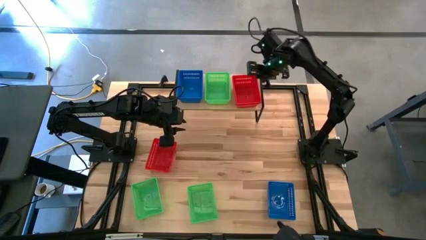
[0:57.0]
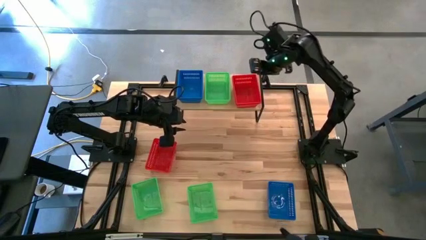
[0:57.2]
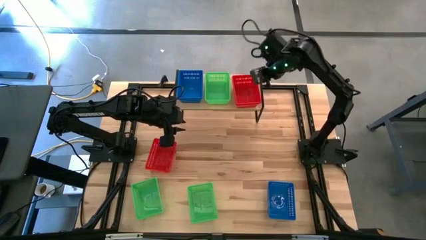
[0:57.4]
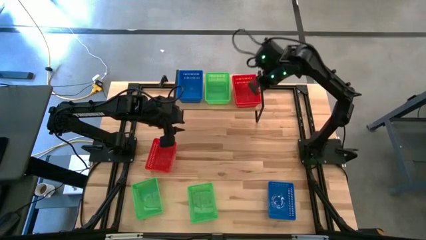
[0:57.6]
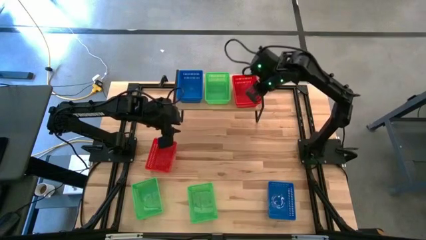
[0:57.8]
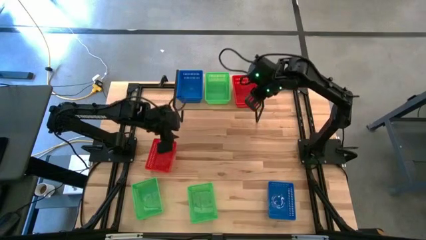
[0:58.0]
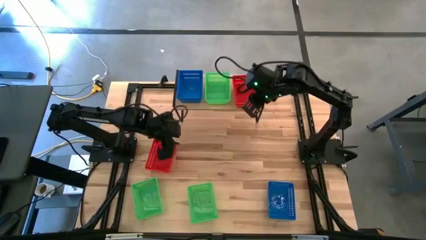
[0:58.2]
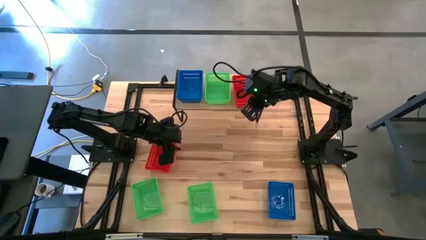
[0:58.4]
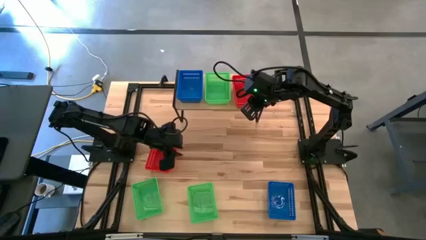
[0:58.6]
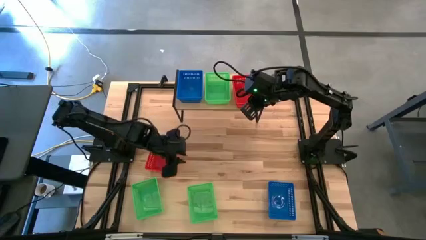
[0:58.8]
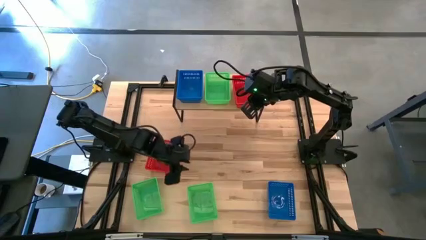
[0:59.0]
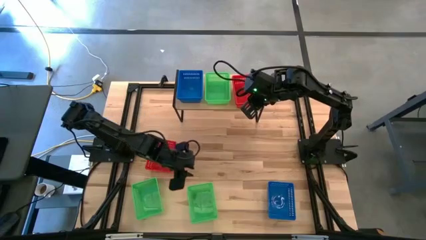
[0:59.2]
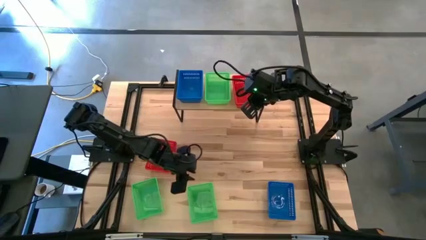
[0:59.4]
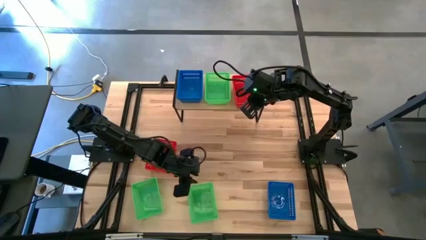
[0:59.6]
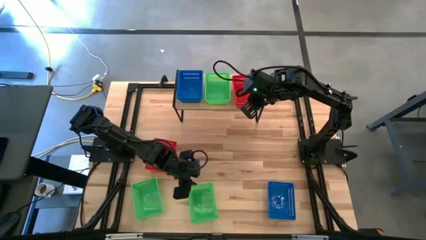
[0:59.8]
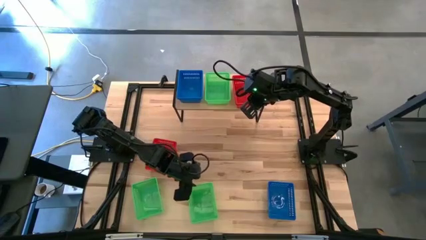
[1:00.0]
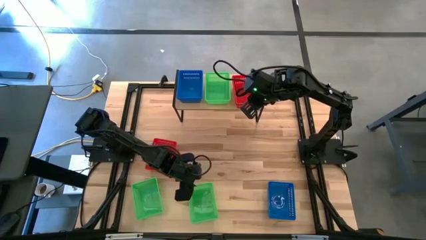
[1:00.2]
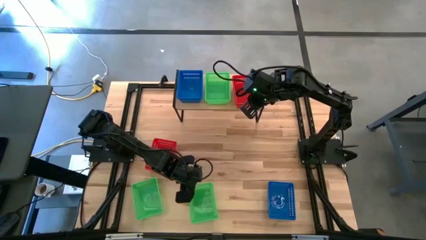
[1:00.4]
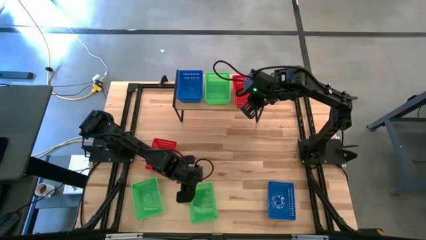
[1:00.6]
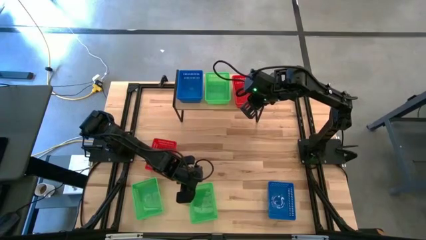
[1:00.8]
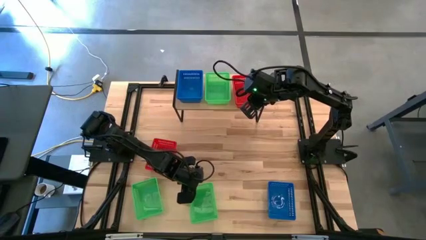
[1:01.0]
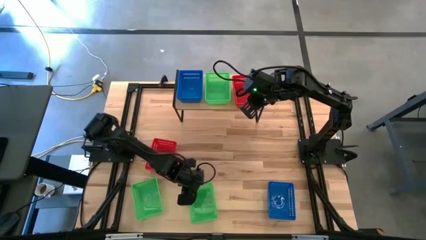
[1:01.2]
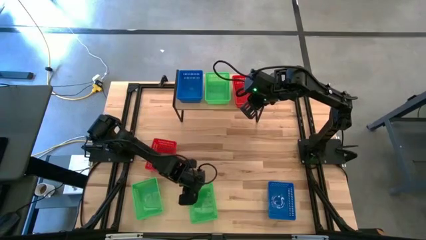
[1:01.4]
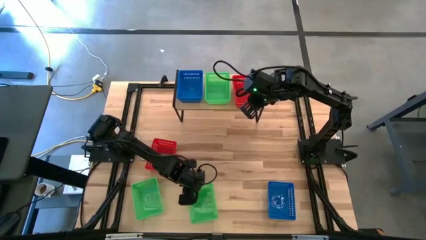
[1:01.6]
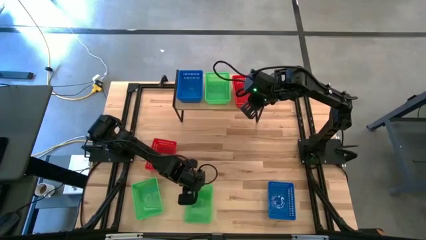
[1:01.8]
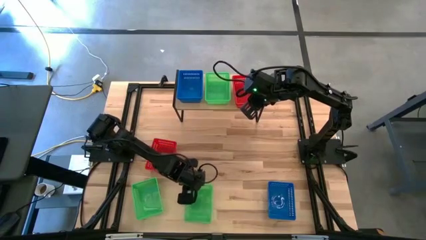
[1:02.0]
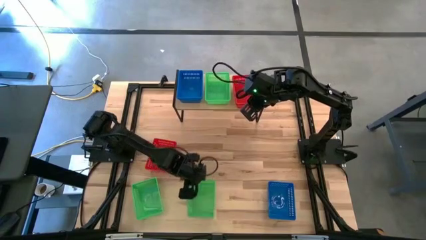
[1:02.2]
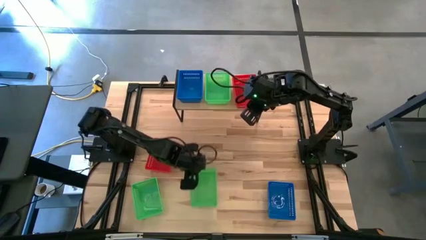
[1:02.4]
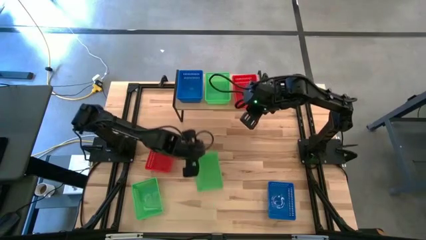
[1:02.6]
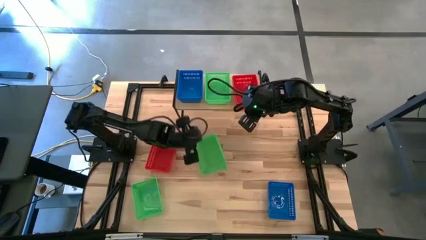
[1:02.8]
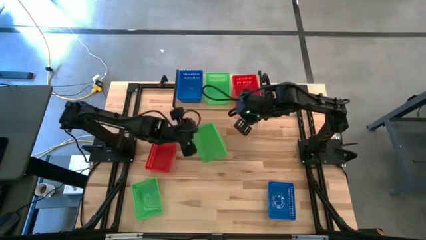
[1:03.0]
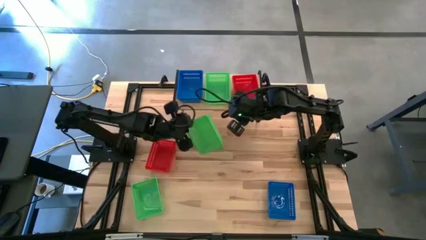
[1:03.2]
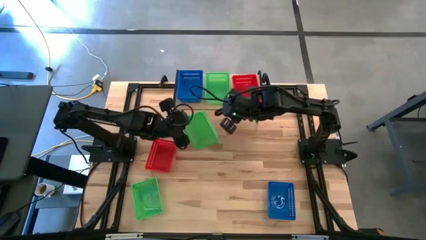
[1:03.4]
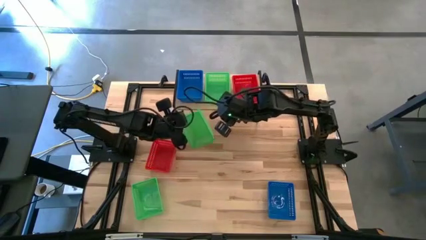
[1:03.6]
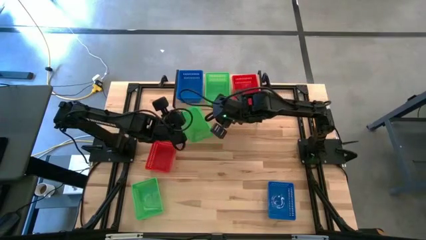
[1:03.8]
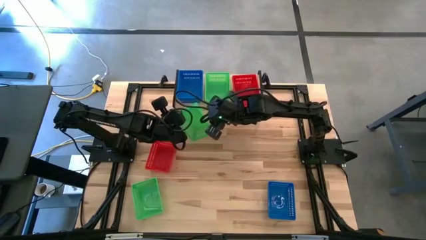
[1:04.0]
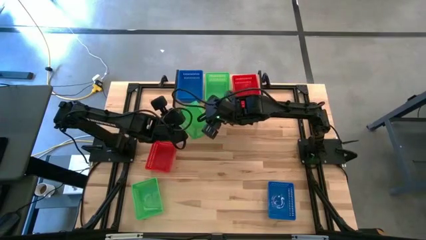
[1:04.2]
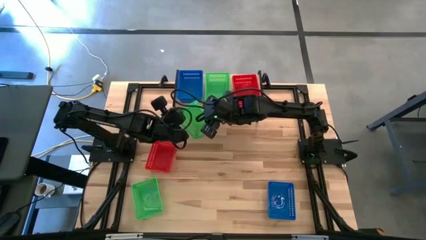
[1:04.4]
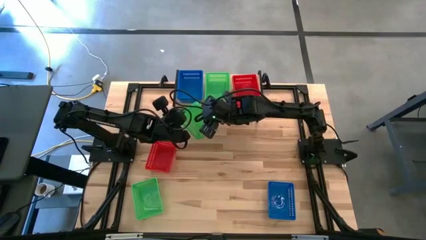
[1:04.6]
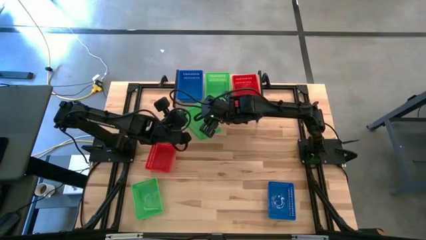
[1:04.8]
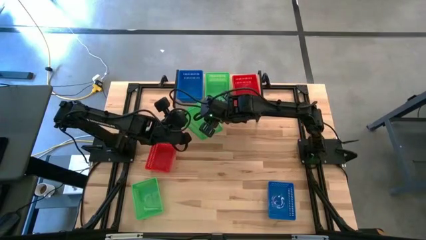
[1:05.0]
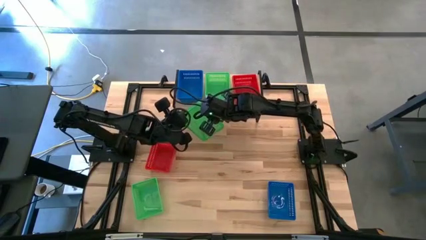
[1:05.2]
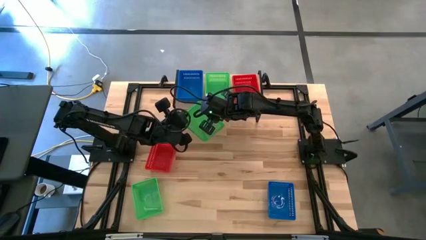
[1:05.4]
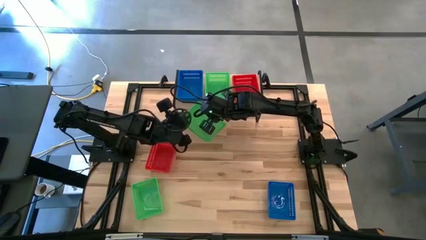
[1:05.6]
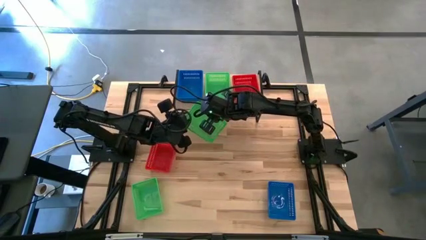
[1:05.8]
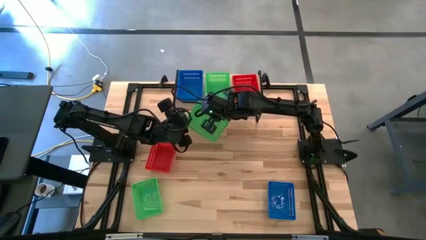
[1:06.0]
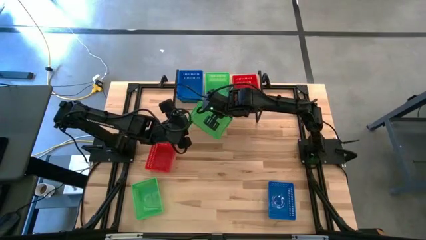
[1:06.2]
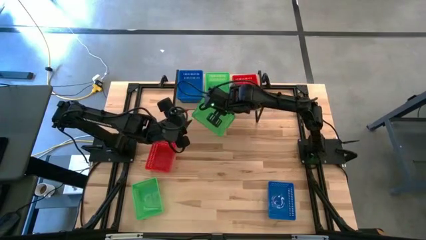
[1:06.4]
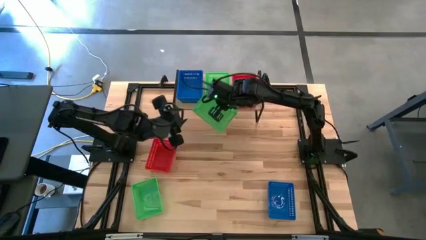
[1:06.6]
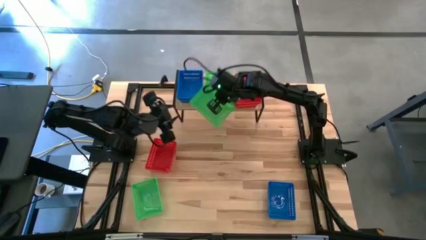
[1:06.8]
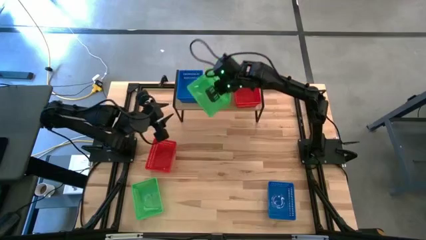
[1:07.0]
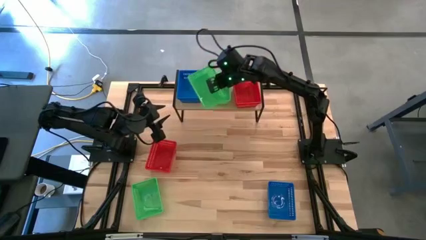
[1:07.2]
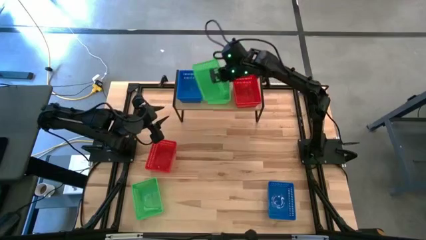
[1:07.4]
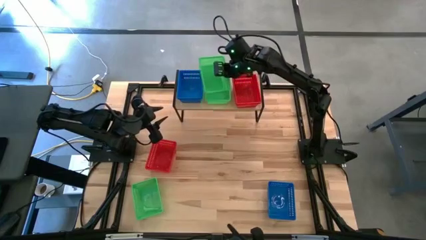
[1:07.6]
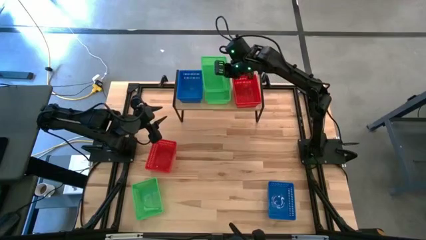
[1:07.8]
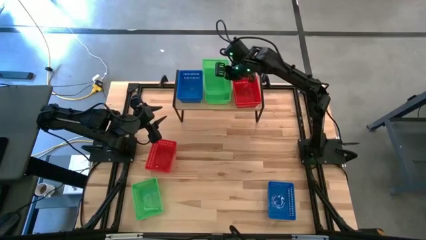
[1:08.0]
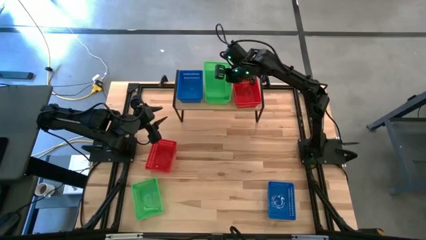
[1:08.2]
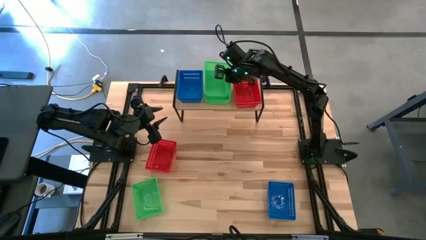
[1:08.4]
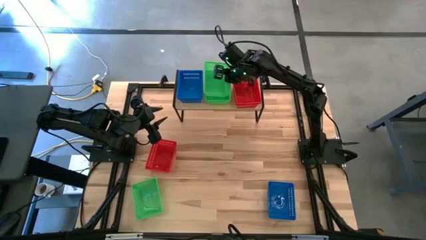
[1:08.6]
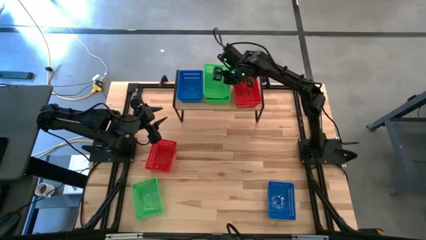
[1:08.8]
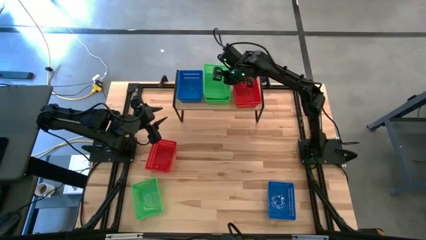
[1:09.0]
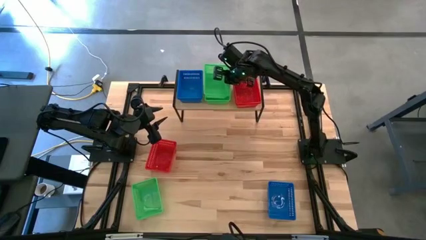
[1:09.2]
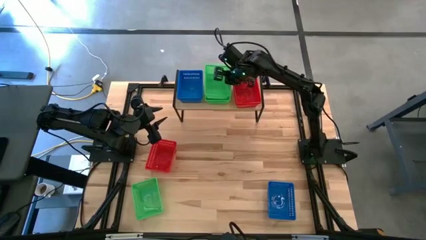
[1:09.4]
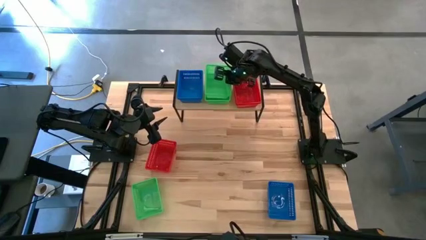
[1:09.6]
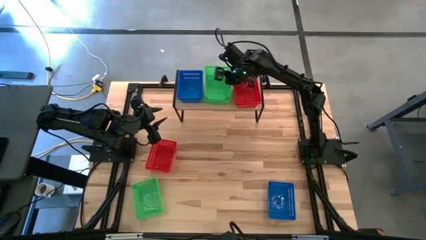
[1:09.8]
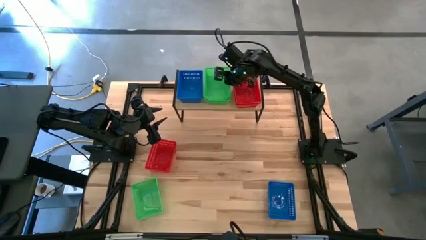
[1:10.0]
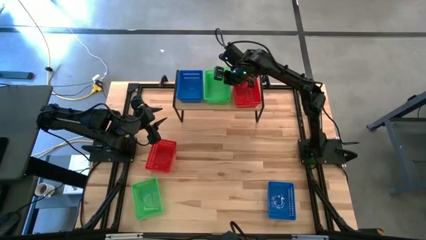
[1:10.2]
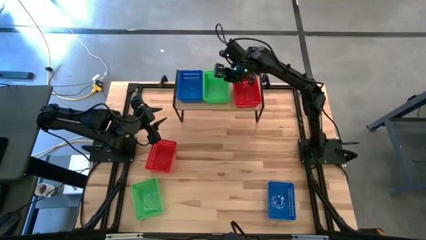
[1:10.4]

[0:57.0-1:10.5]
Task: Stack baskets on shelf by color
Stack the right green bin on top of the green bin on the shelf

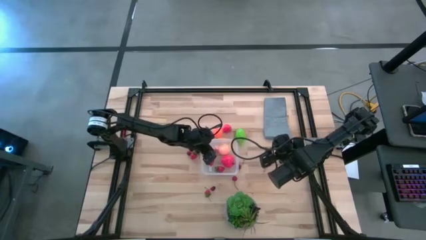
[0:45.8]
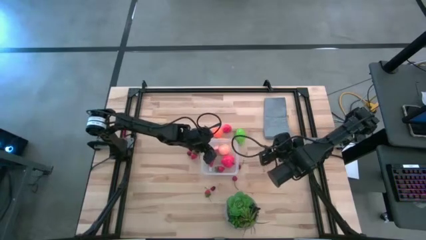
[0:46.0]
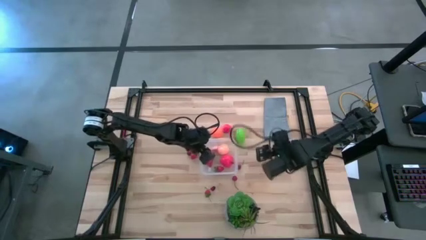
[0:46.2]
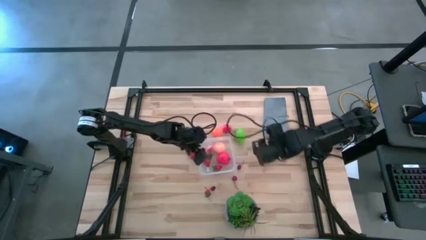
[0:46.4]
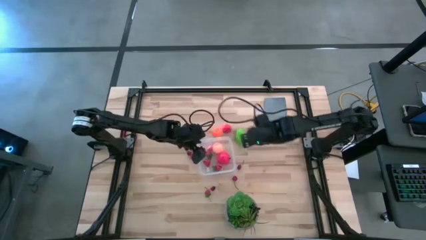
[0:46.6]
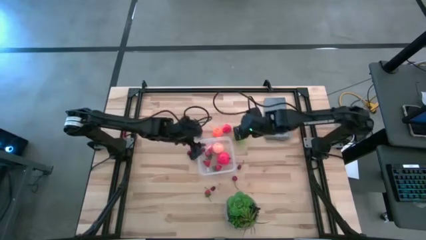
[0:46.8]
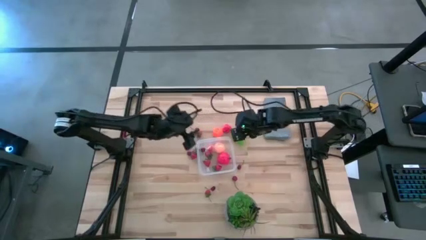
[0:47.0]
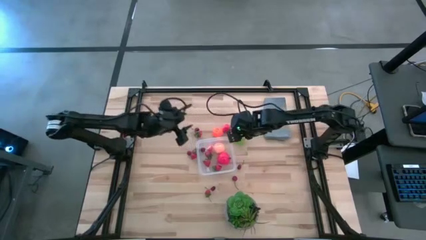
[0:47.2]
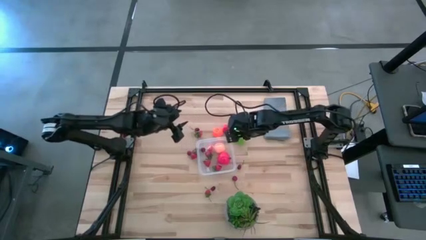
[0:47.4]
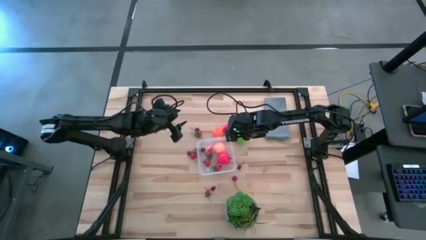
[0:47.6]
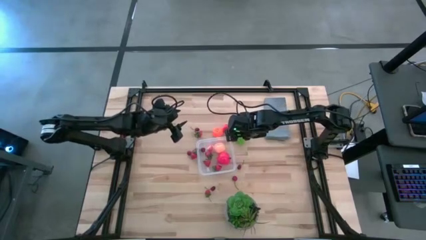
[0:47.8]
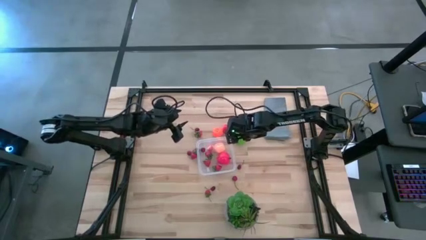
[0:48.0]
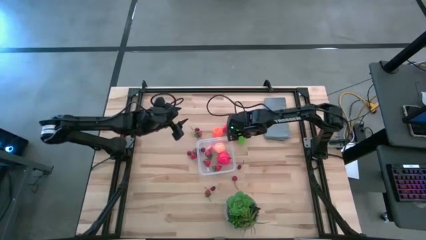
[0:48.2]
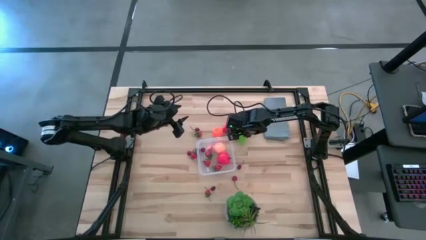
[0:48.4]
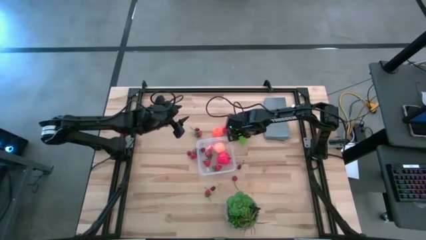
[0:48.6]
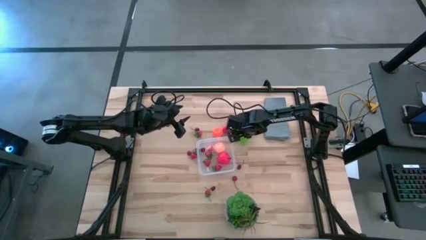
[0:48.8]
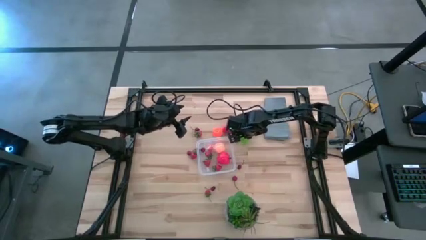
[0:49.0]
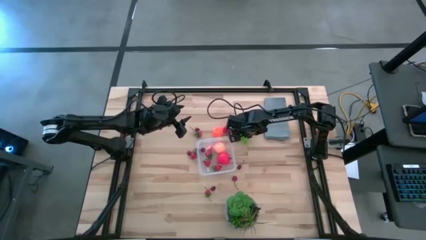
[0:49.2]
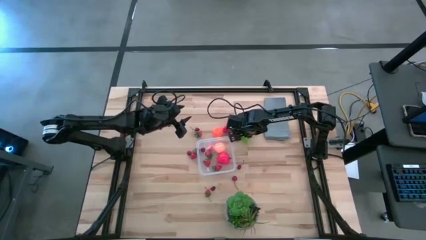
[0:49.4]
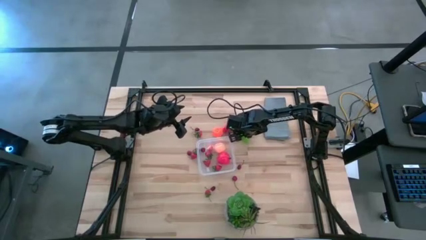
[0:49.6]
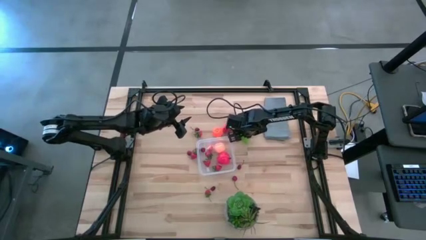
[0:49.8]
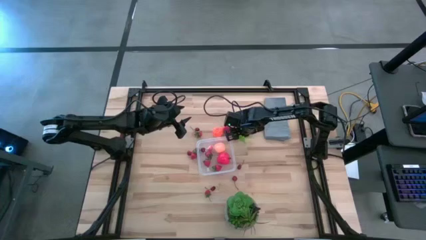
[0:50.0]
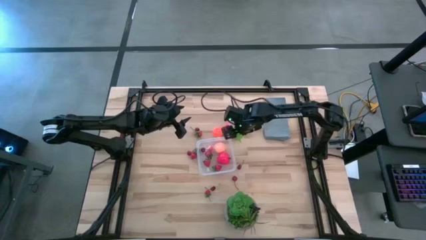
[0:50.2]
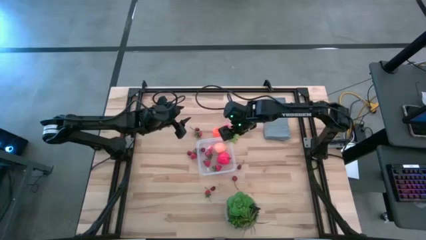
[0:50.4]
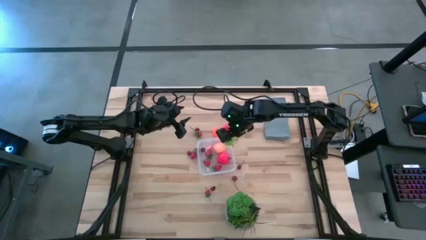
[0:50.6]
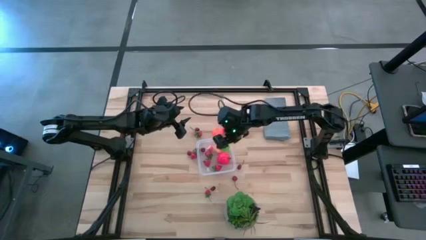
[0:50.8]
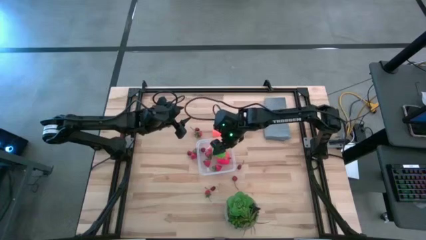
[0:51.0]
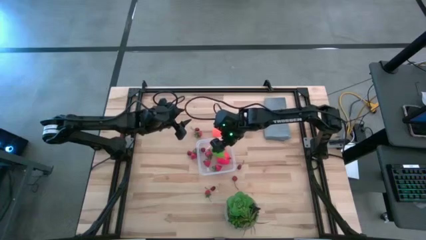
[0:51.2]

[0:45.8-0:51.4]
Task: Pick and placing Produce into tupperware
Put the green melon into the transparent container
